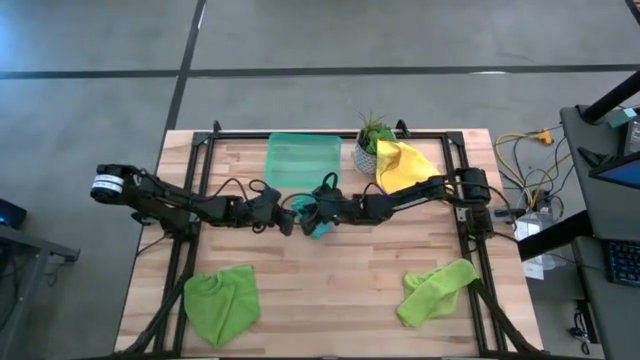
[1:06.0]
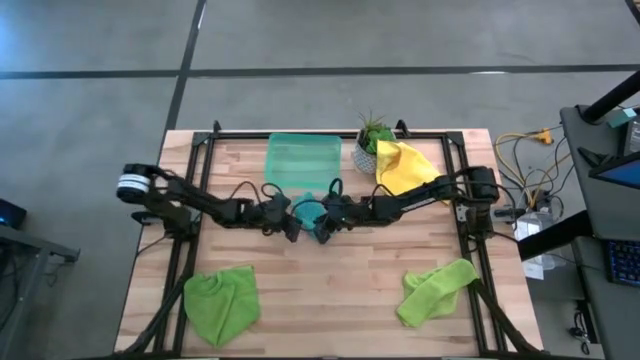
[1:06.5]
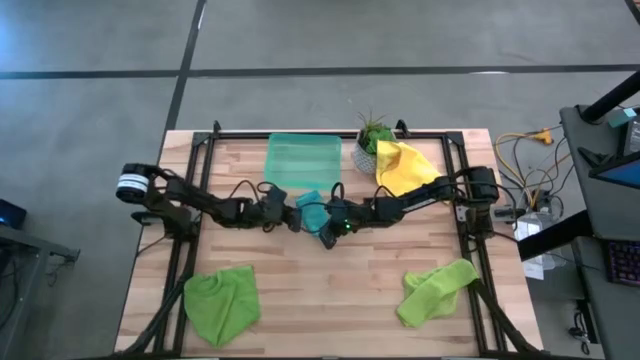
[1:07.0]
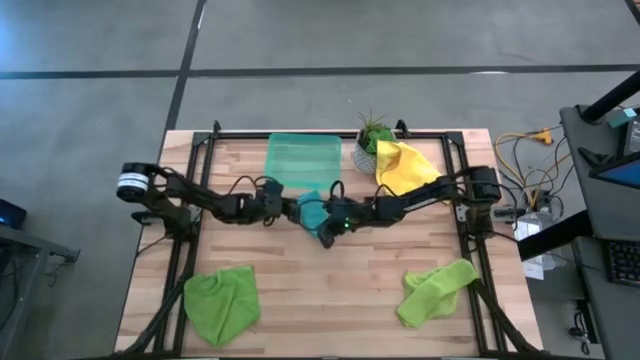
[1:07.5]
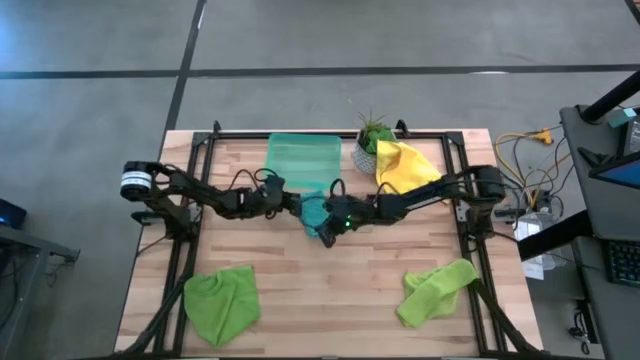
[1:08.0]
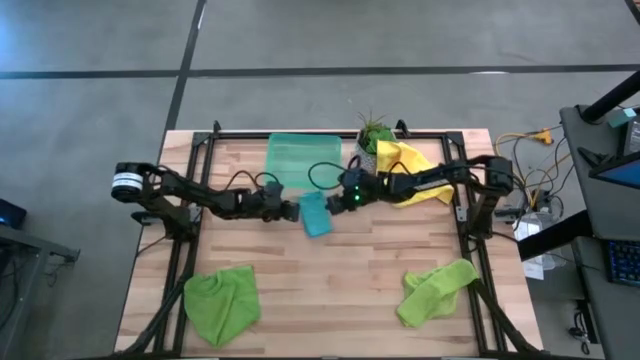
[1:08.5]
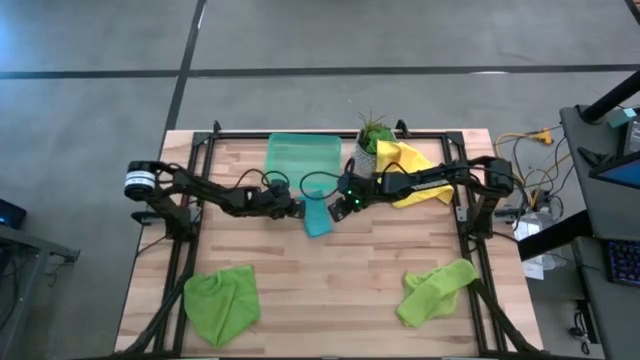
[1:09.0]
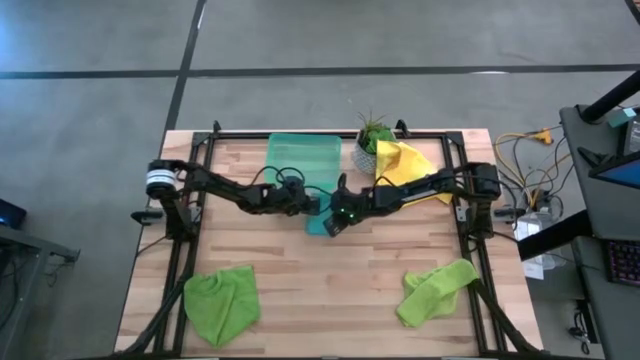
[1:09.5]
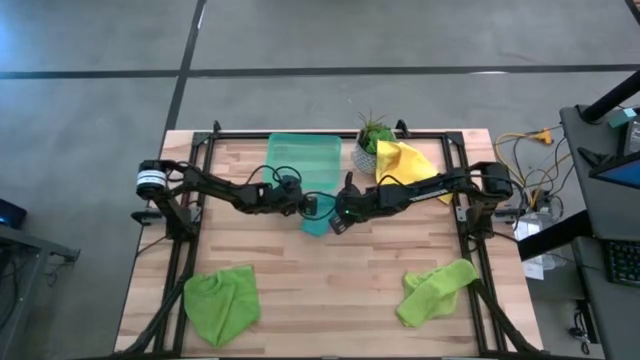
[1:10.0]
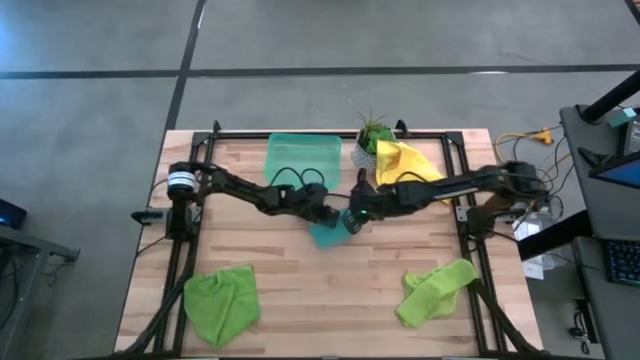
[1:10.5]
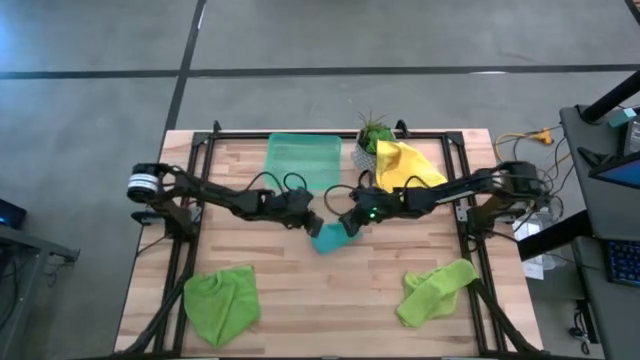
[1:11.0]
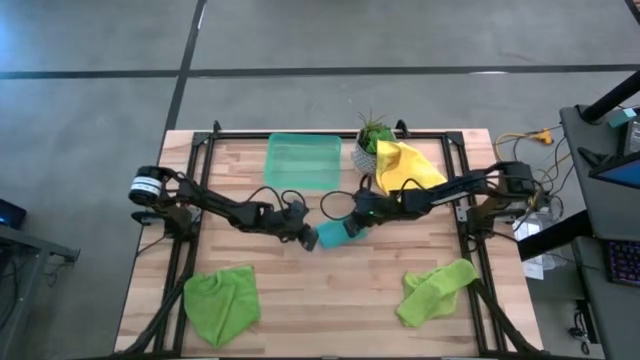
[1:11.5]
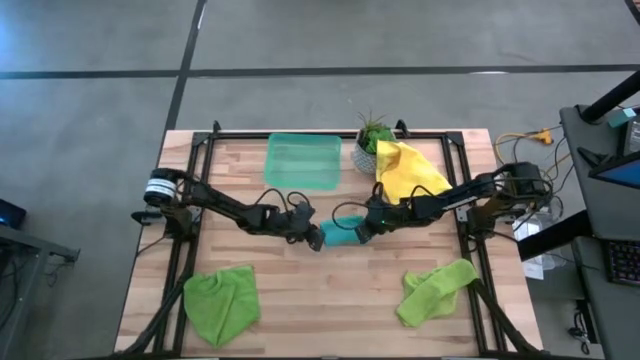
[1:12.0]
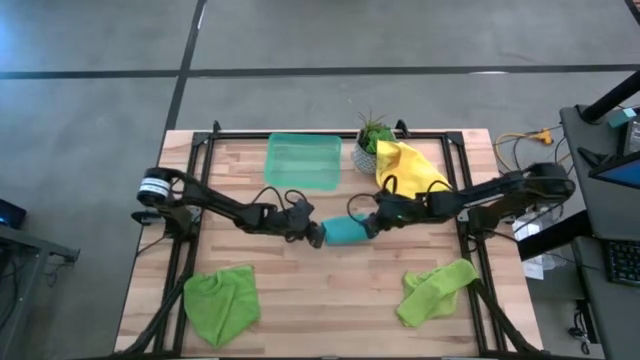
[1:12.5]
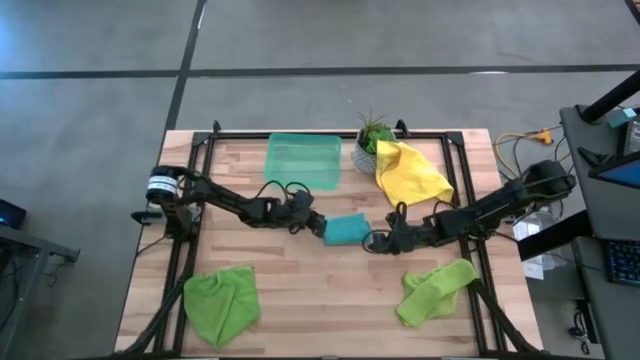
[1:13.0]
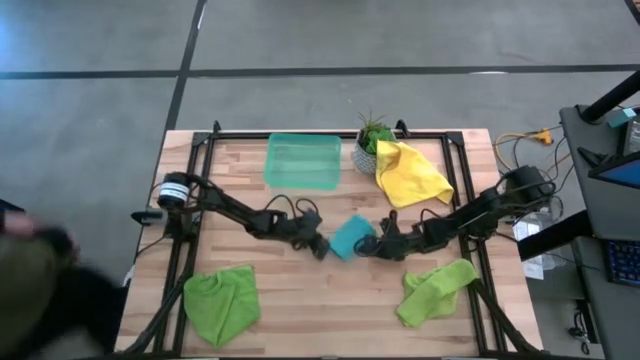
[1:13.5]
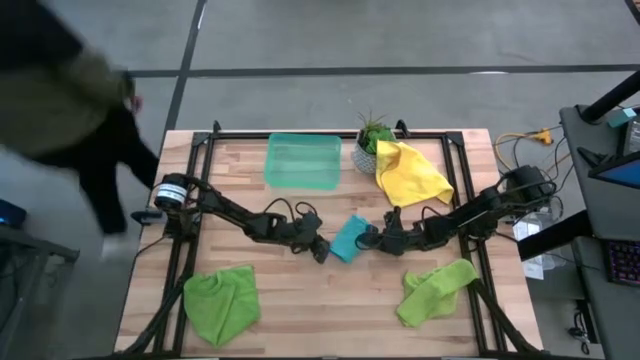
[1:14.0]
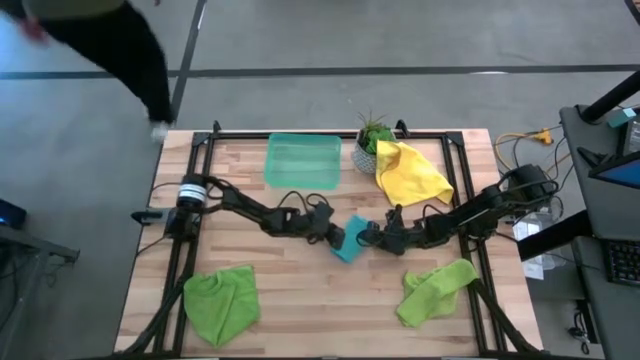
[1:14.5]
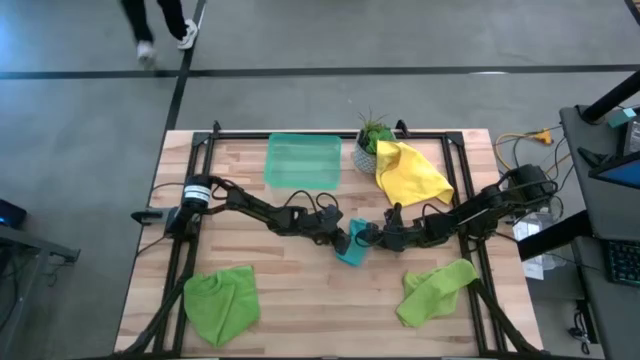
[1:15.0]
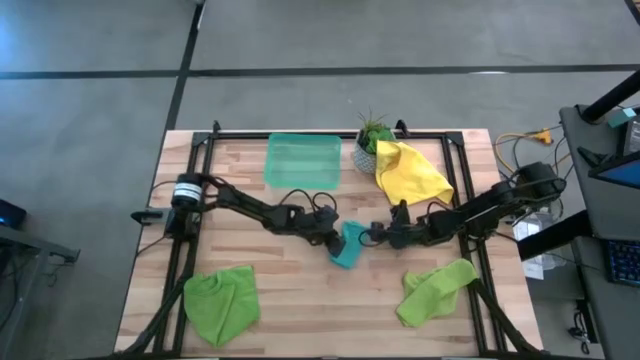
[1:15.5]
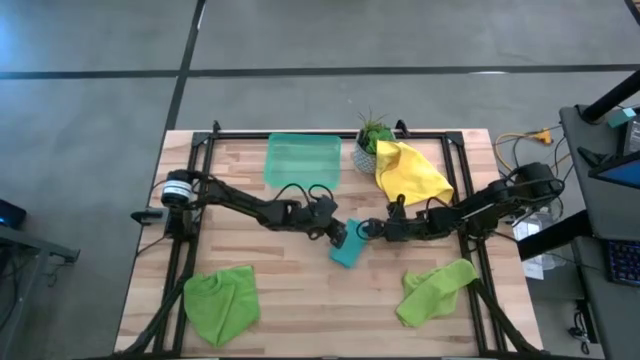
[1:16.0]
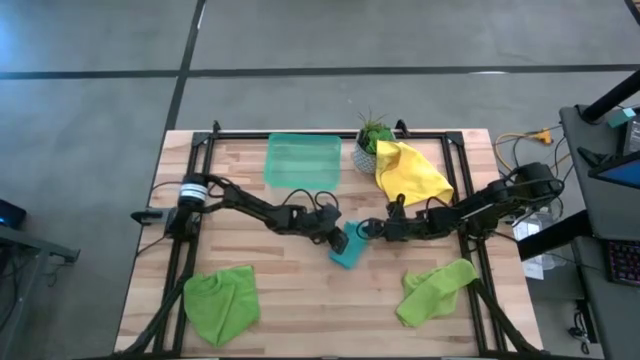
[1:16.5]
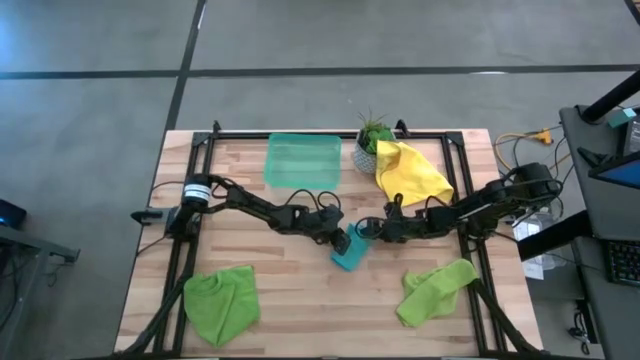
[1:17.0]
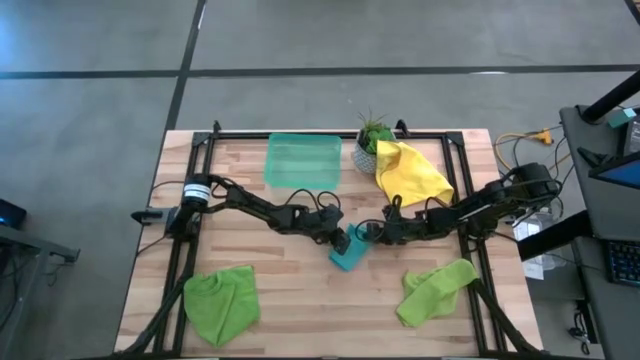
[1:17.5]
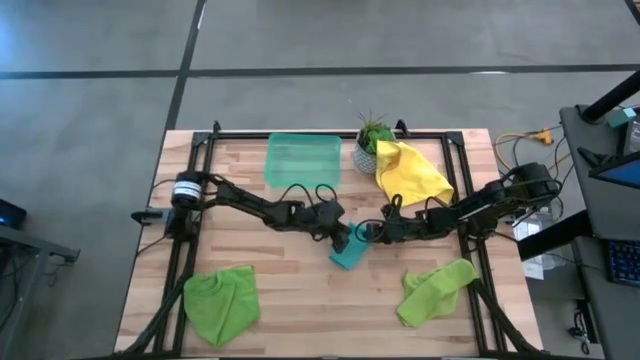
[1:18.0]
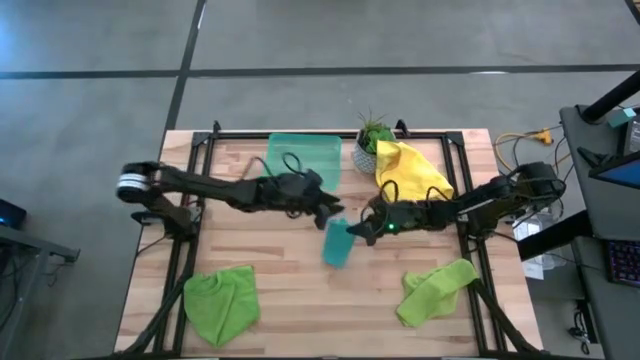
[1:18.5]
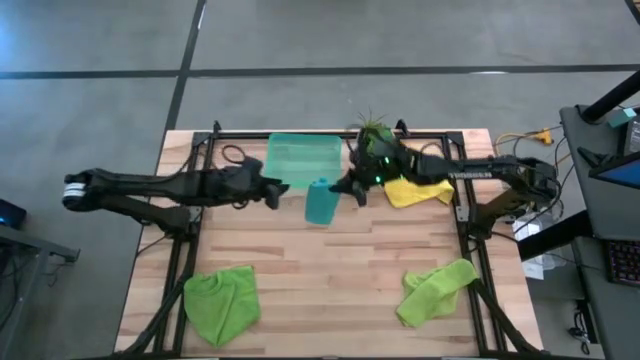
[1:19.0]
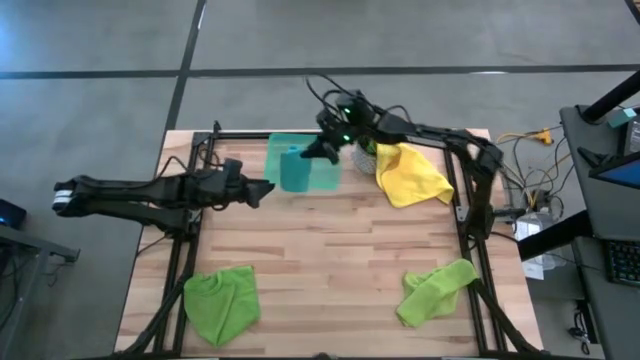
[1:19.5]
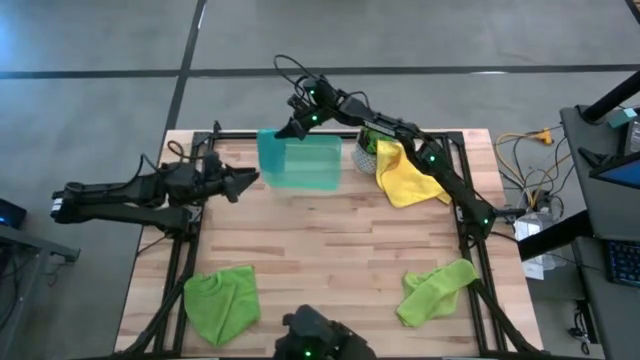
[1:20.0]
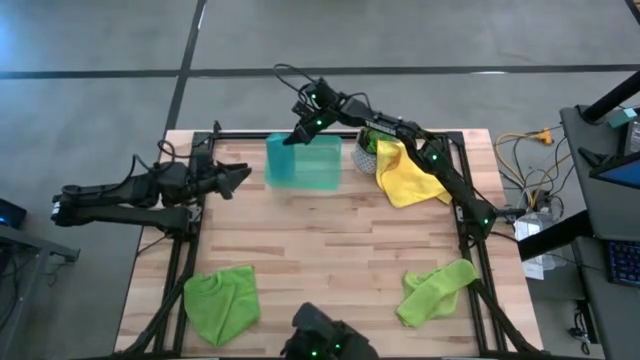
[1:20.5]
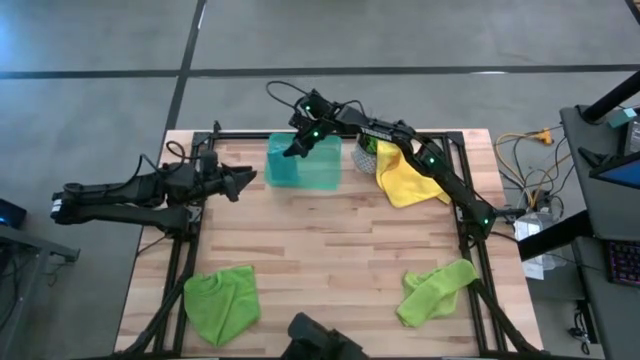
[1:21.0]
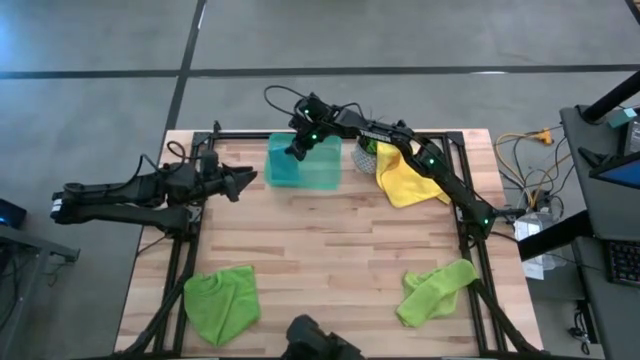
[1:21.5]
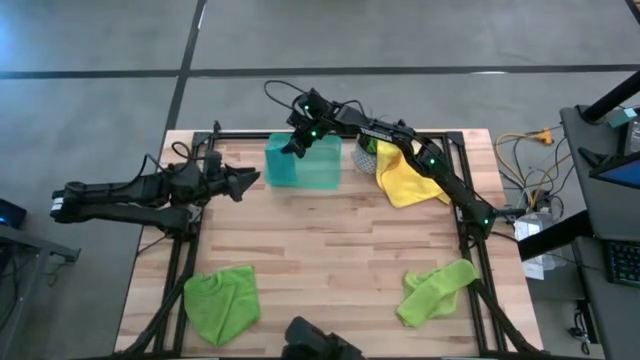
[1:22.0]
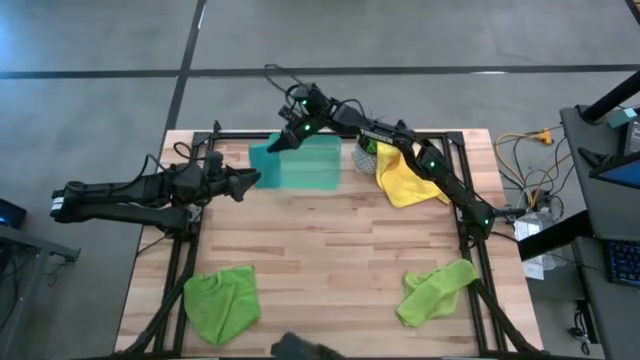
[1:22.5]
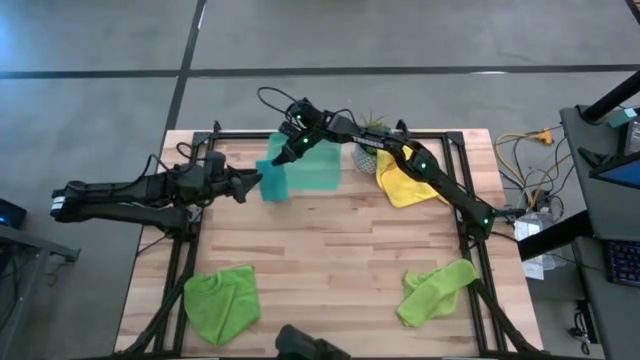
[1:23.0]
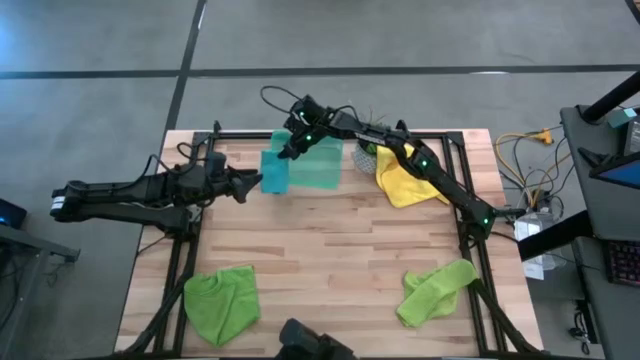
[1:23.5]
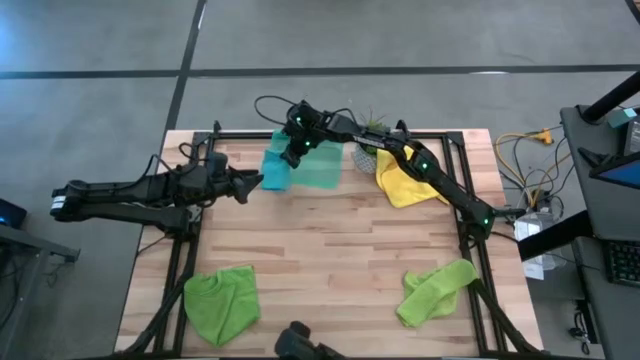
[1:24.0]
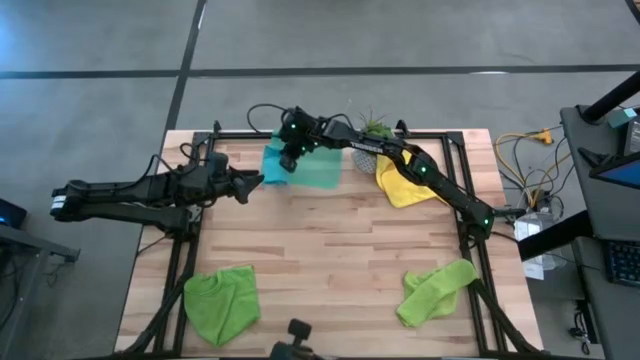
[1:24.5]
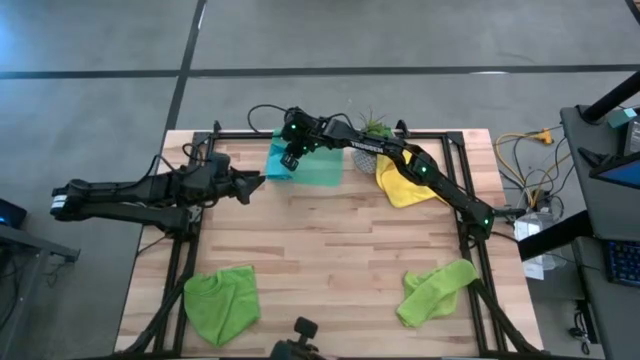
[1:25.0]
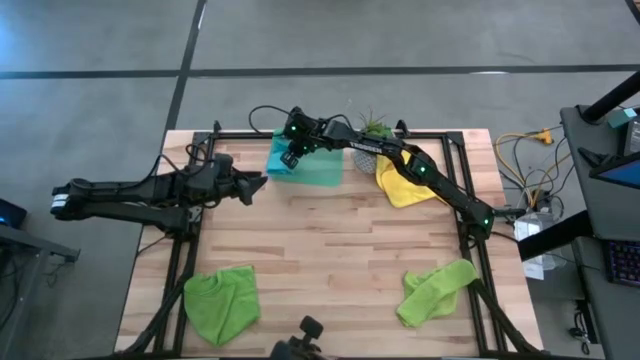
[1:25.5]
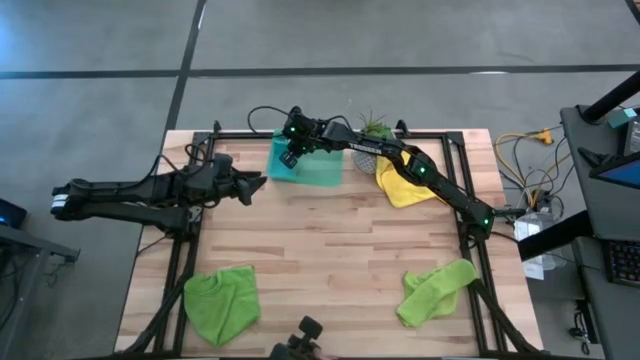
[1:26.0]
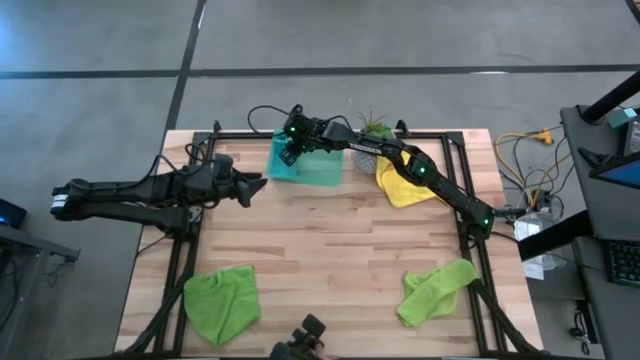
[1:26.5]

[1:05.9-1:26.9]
Task: Fold microfiber towels
Put the folded blue microfiber towel into the blue bin
